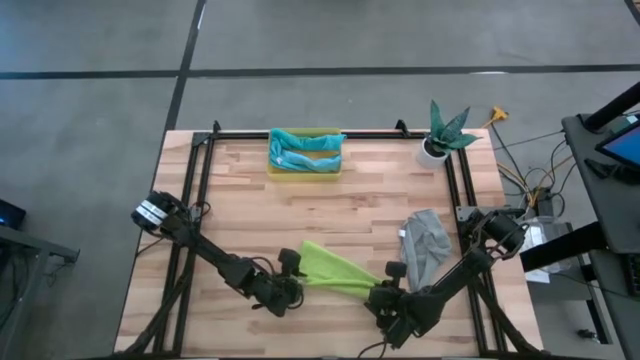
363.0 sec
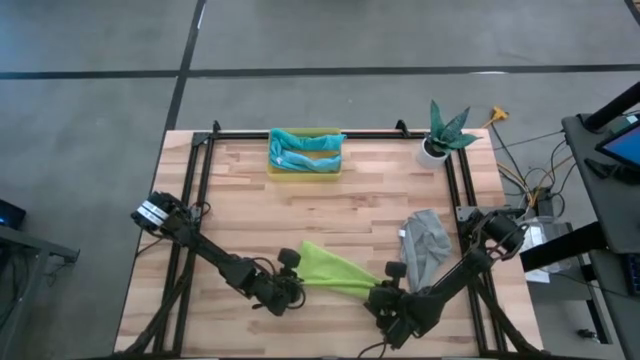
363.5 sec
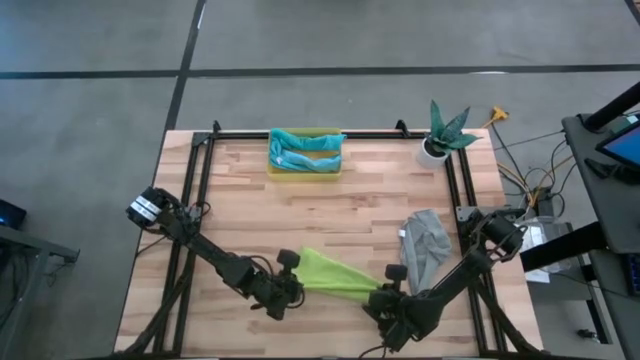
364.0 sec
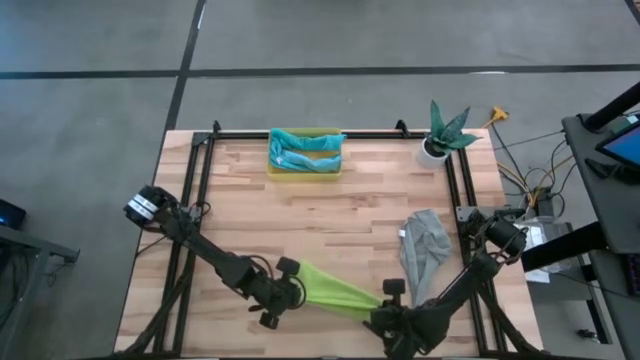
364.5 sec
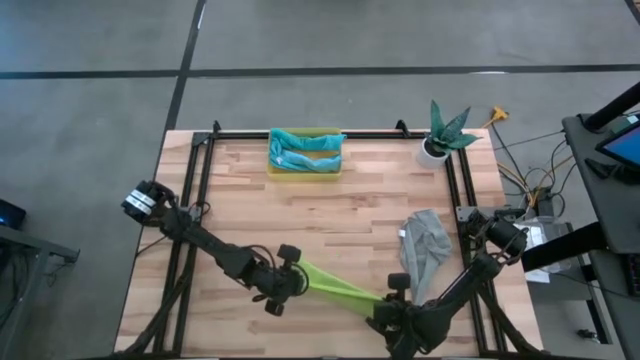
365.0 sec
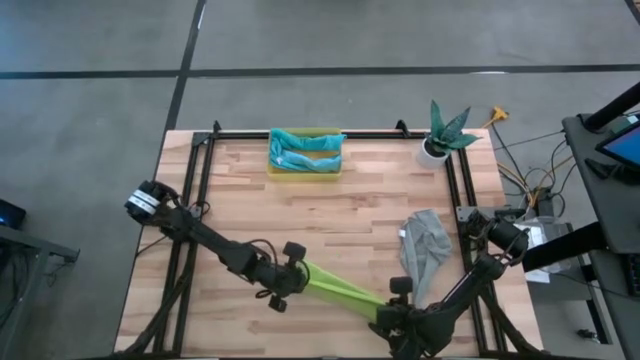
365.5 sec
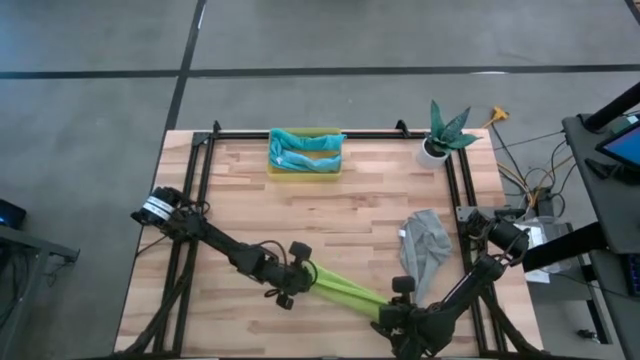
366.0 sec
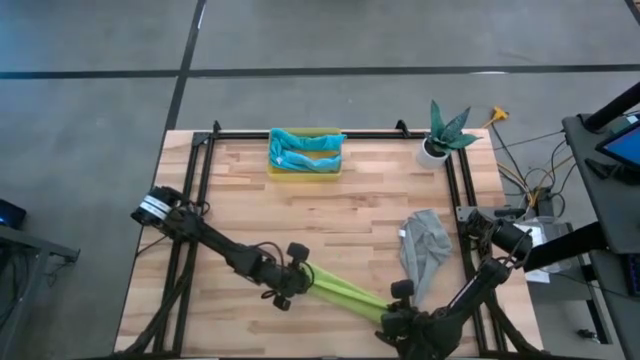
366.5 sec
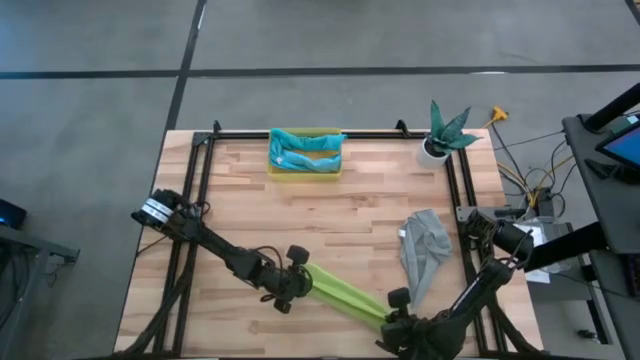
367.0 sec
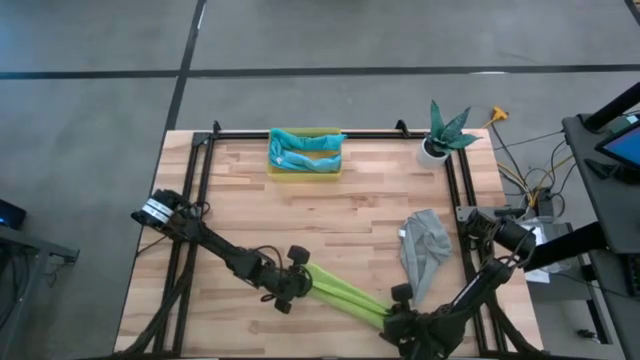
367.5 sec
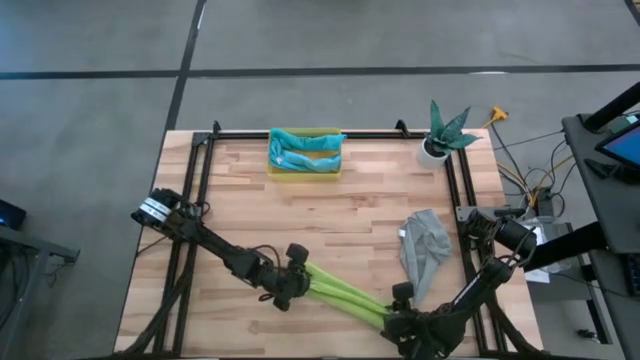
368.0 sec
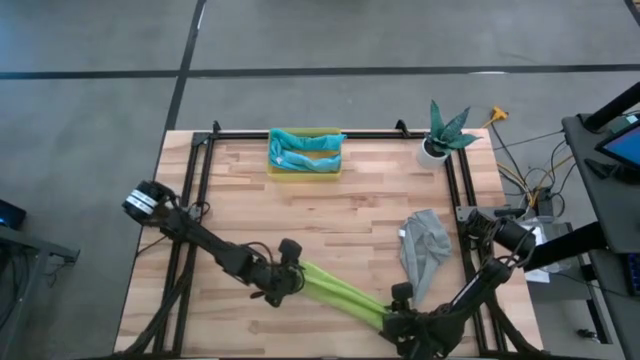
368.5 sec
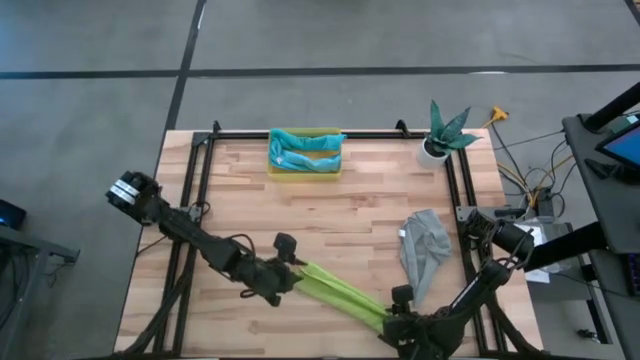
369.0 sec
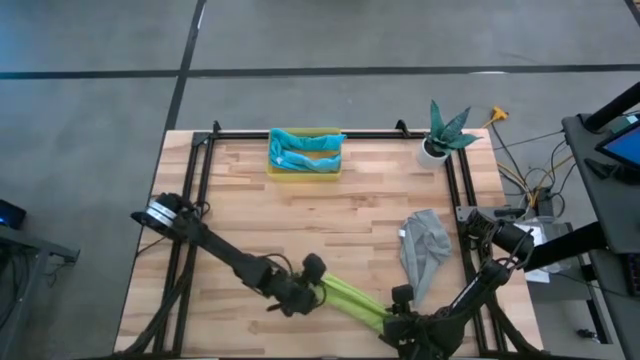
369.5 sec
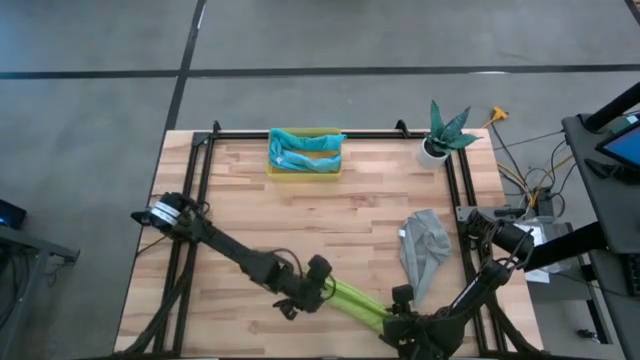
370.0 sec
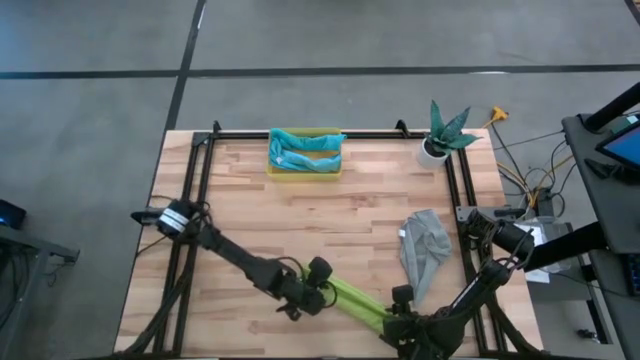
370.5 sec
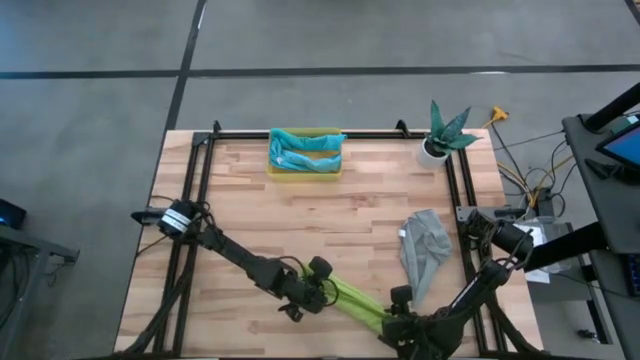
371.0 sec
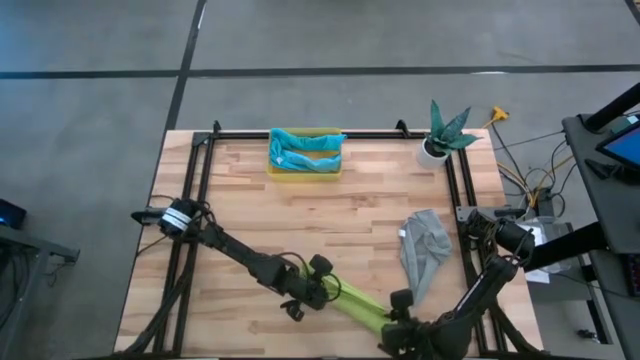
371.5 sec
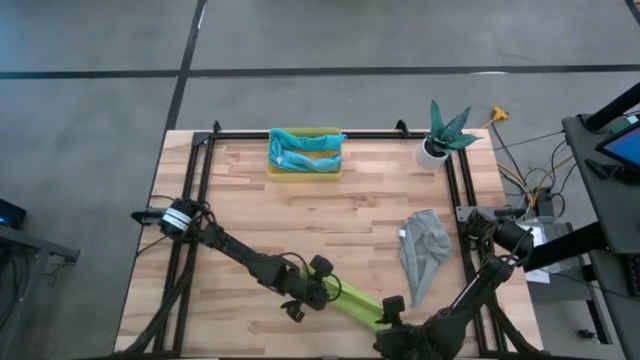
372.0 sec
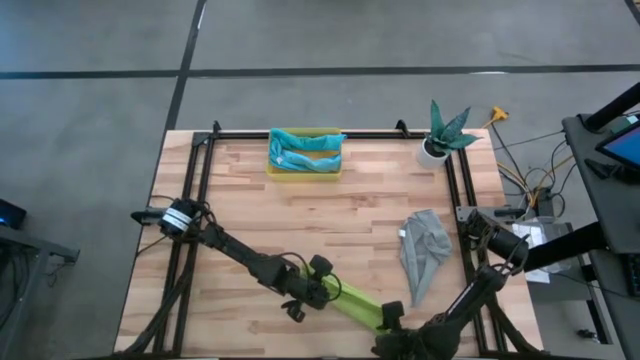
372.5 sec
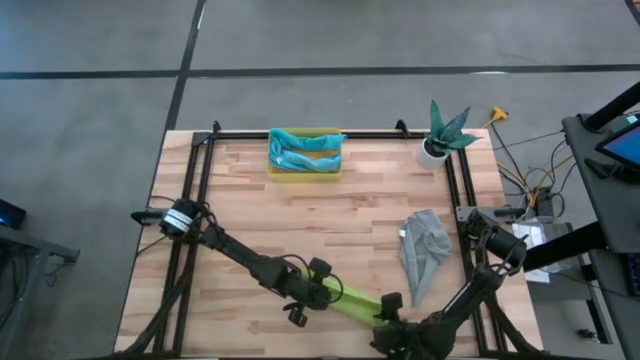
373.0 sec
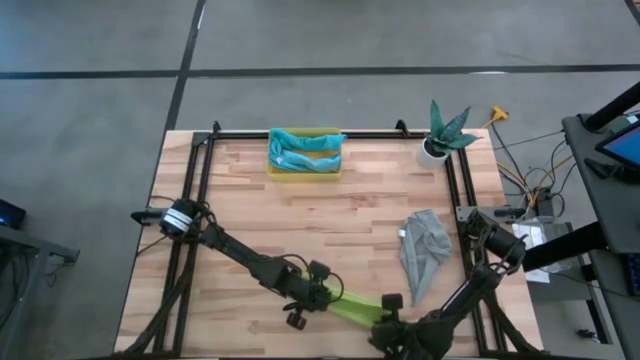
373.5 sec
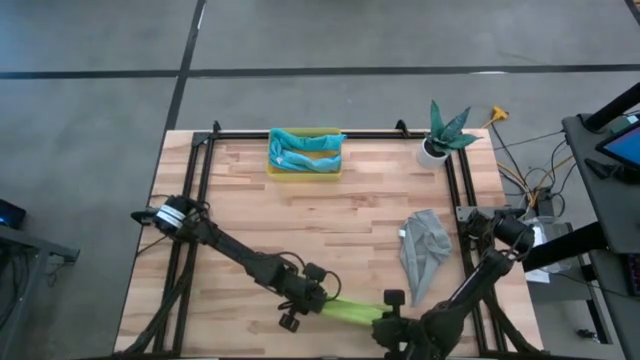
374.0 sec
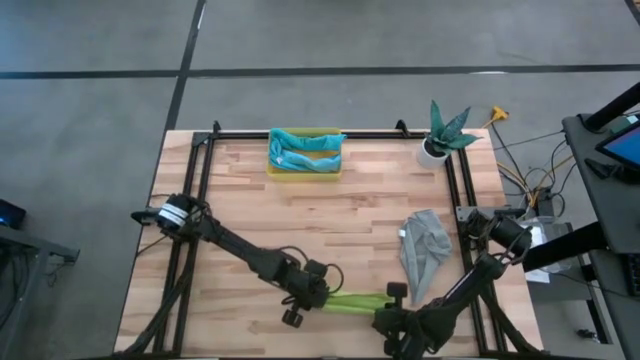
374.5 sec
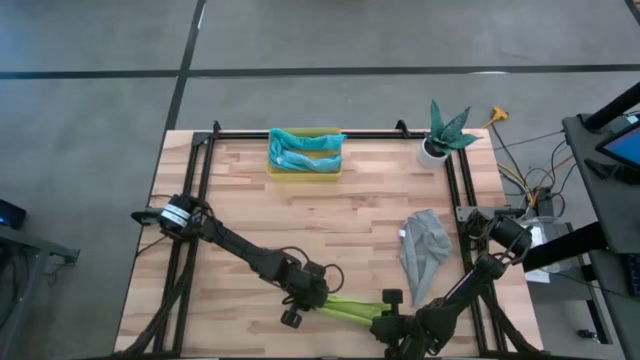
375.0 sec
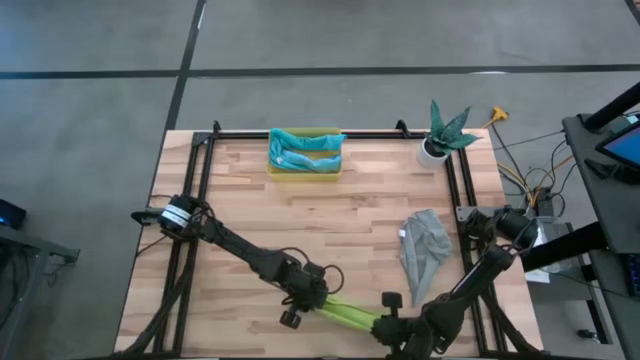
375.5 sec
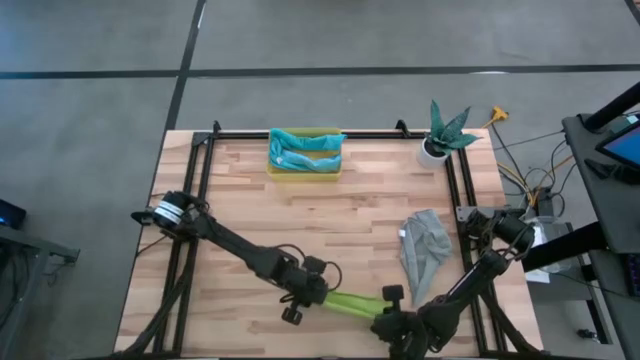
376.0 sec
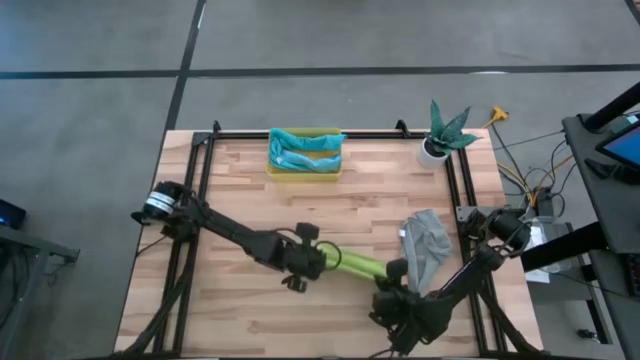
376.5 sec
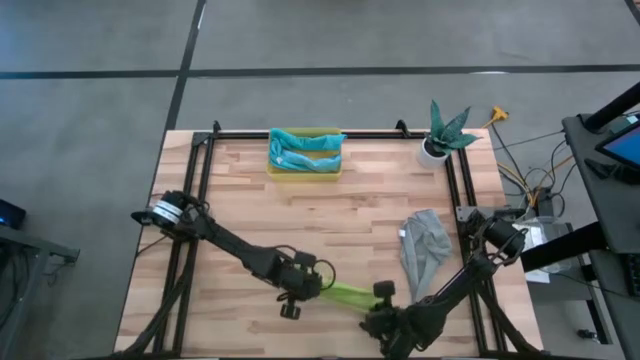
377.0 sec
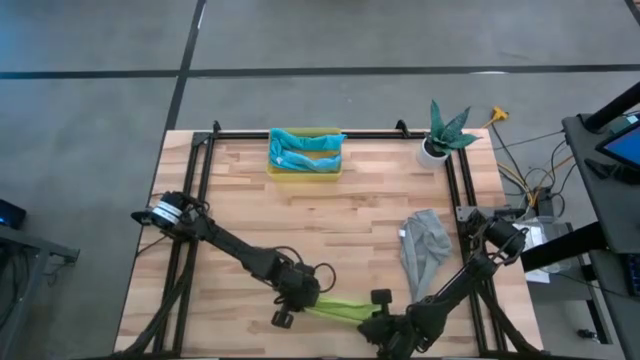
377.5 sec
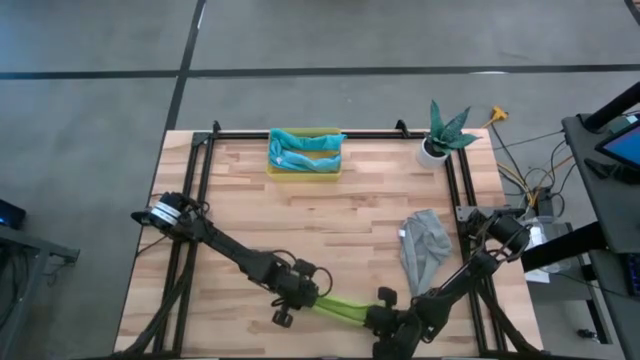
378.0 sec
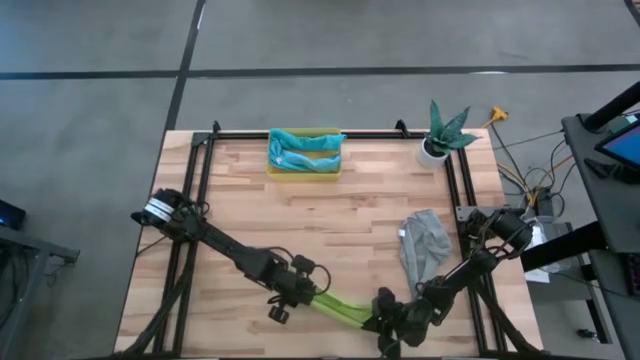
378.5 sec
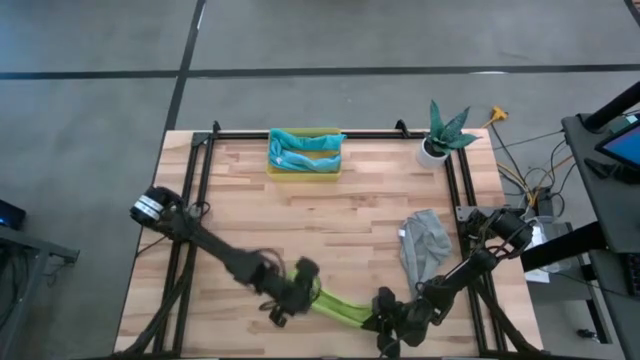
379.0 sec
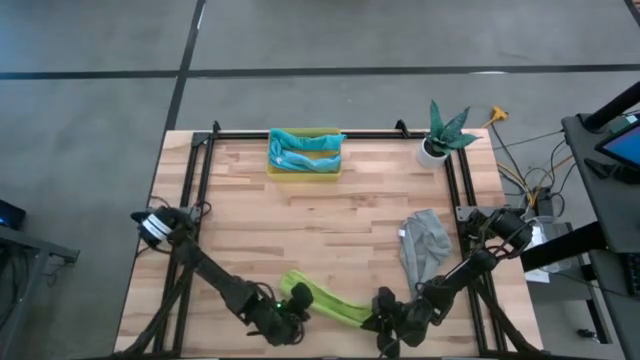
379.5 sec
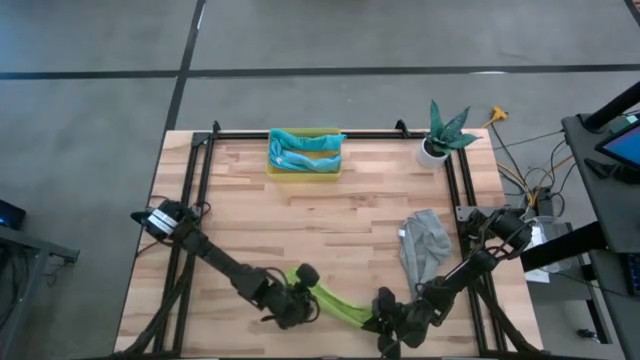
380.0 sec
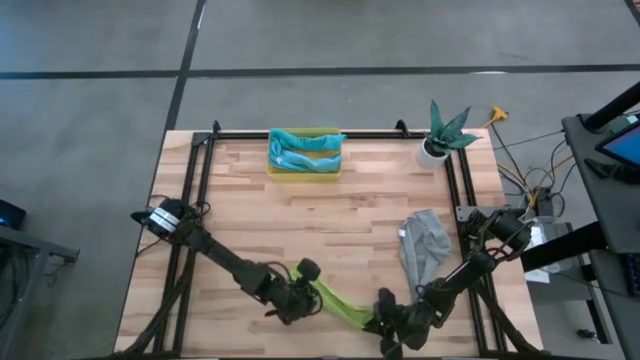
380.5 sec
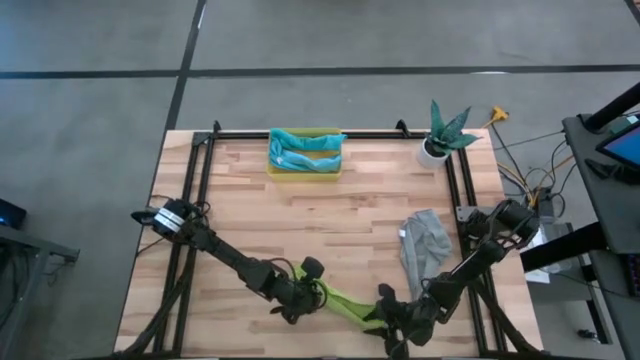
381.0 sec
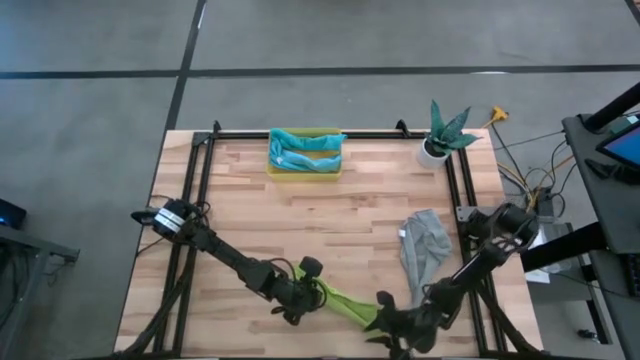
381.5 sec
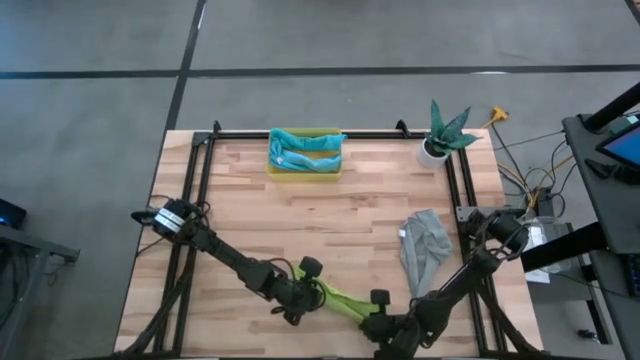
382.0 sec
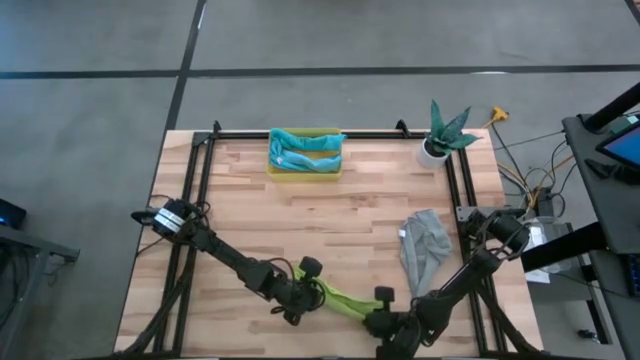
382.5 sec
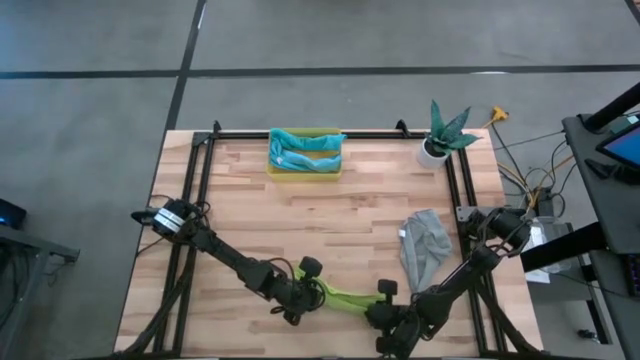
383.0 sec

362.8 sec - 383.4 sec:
Task: Roll microfiber towels into tight, uniform cylinder then place into a basket
Roll the green towel
